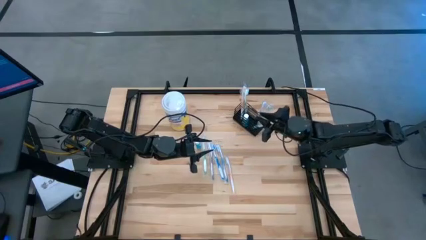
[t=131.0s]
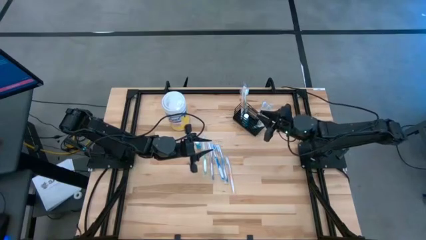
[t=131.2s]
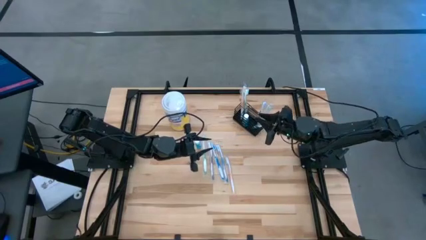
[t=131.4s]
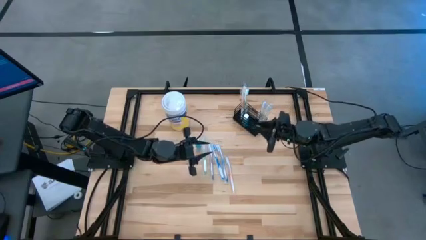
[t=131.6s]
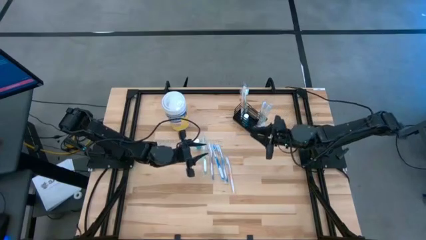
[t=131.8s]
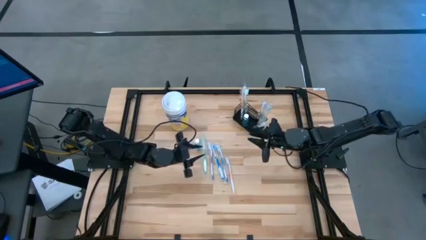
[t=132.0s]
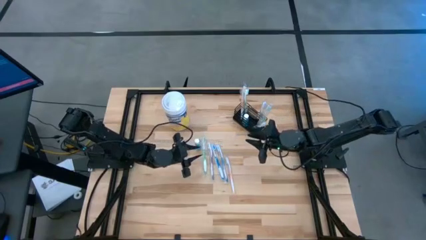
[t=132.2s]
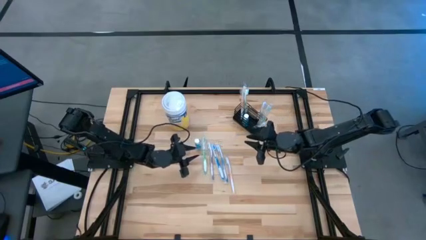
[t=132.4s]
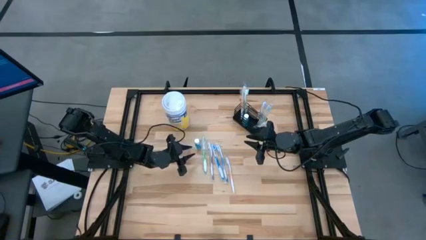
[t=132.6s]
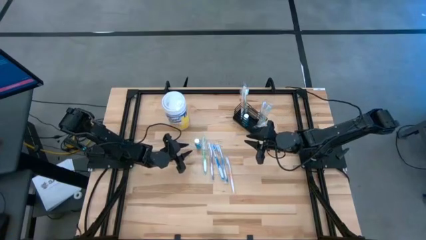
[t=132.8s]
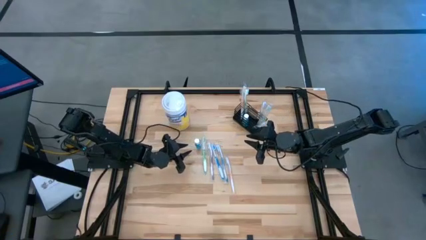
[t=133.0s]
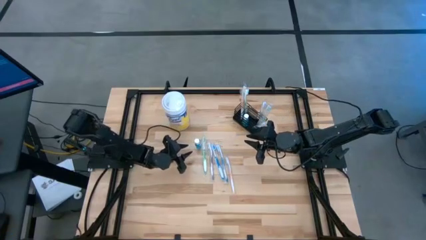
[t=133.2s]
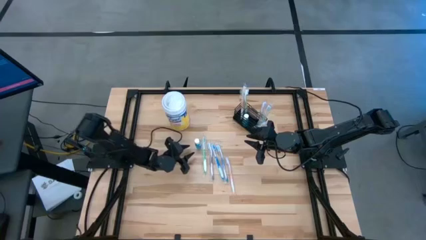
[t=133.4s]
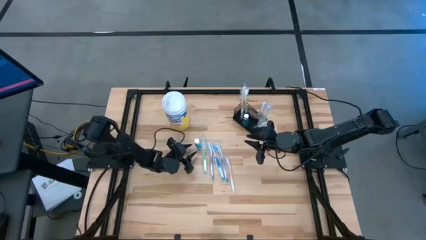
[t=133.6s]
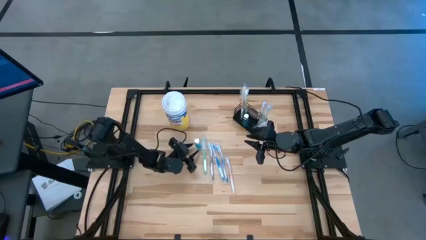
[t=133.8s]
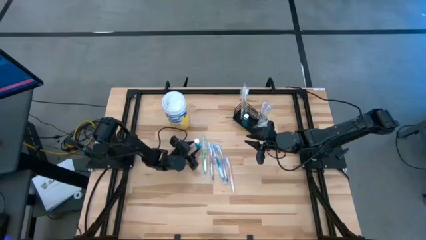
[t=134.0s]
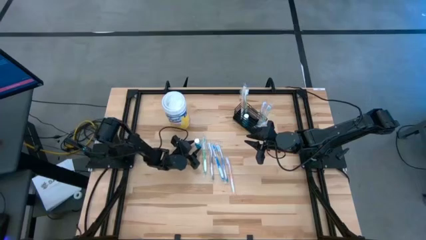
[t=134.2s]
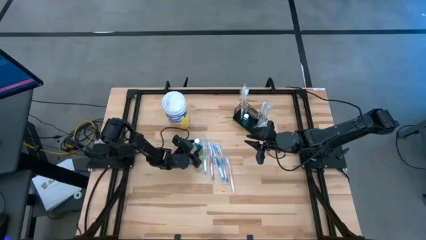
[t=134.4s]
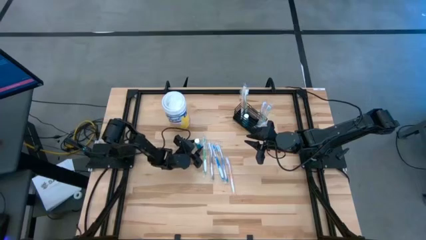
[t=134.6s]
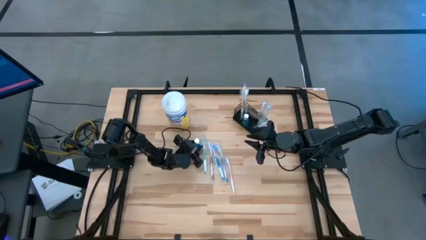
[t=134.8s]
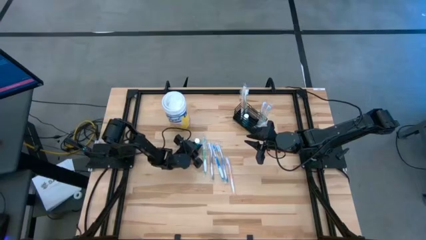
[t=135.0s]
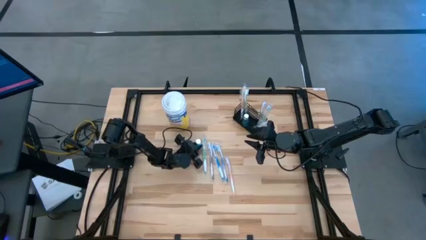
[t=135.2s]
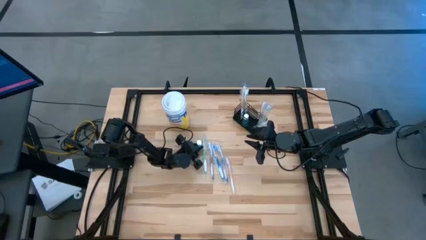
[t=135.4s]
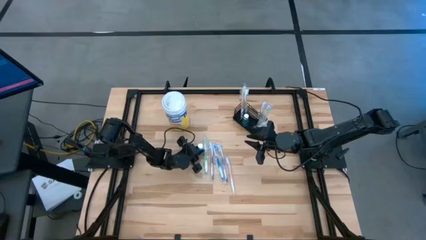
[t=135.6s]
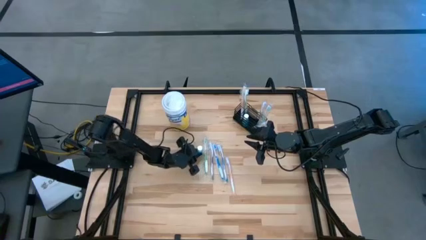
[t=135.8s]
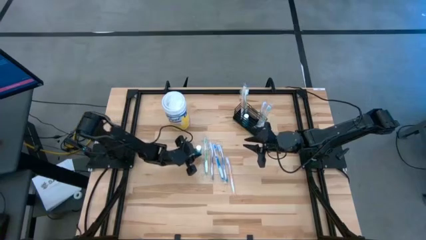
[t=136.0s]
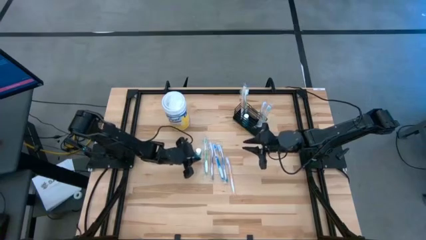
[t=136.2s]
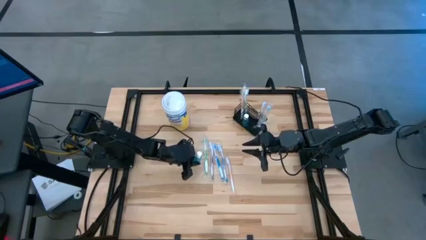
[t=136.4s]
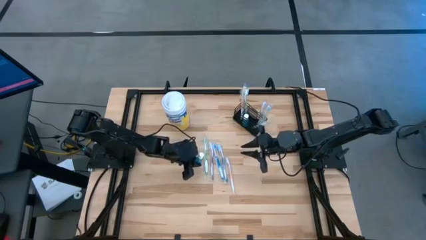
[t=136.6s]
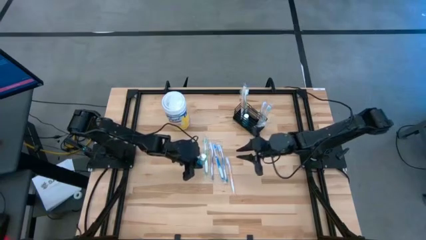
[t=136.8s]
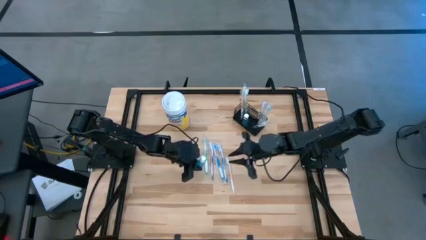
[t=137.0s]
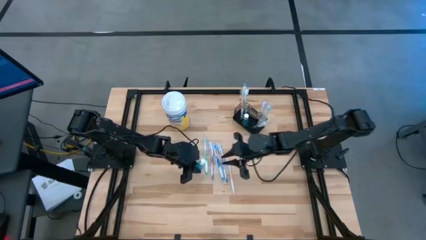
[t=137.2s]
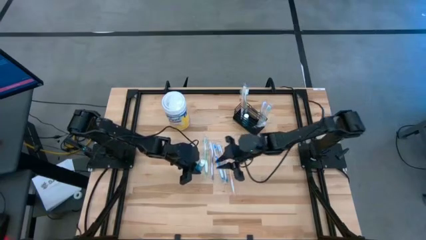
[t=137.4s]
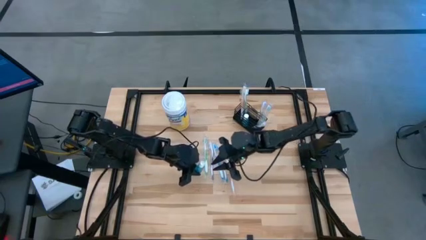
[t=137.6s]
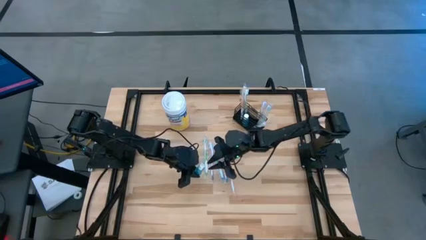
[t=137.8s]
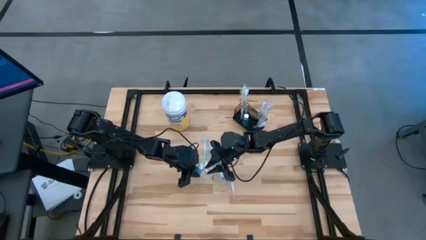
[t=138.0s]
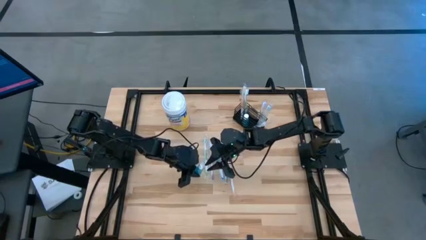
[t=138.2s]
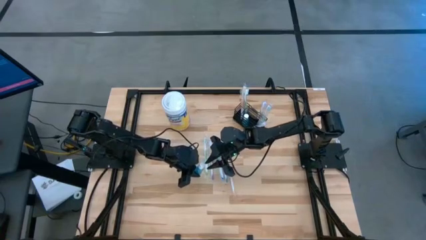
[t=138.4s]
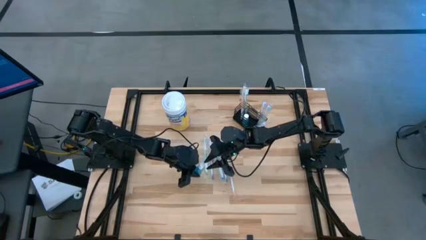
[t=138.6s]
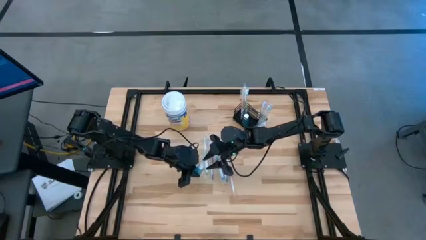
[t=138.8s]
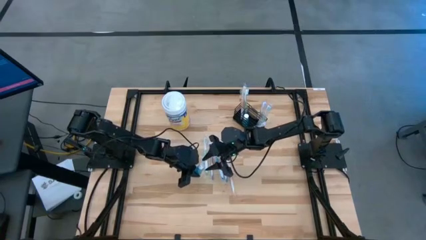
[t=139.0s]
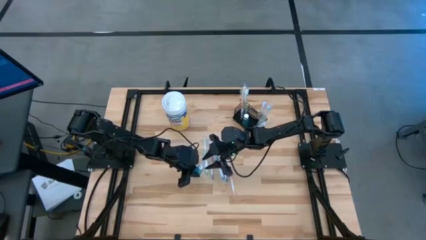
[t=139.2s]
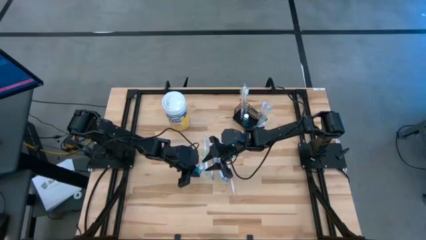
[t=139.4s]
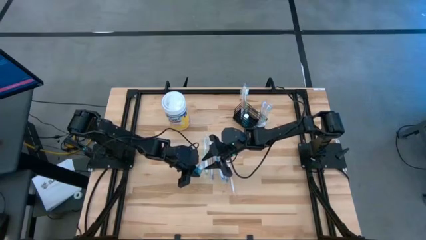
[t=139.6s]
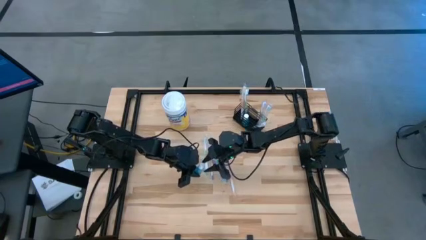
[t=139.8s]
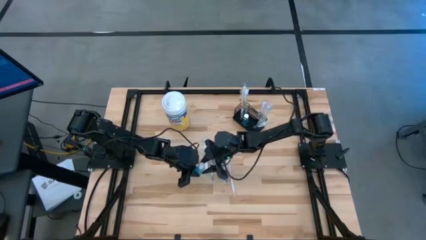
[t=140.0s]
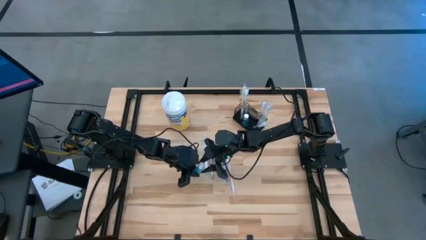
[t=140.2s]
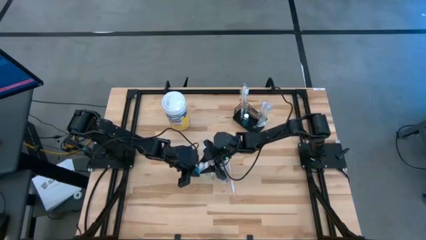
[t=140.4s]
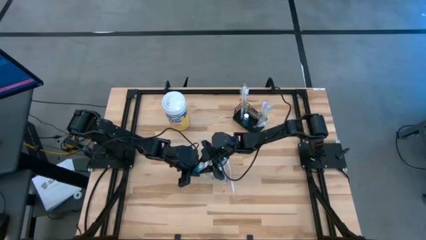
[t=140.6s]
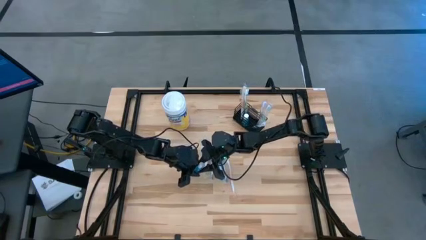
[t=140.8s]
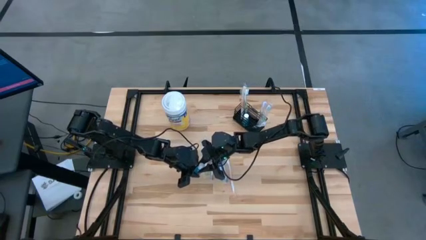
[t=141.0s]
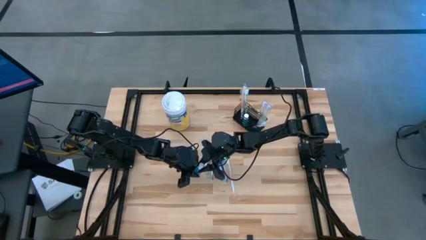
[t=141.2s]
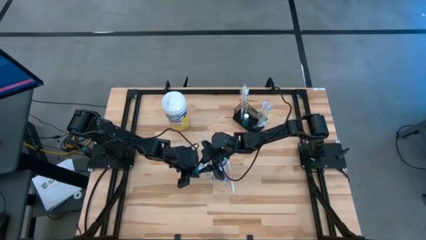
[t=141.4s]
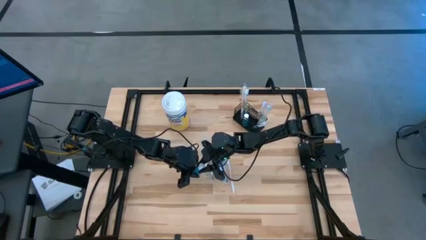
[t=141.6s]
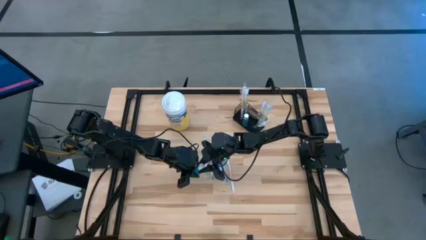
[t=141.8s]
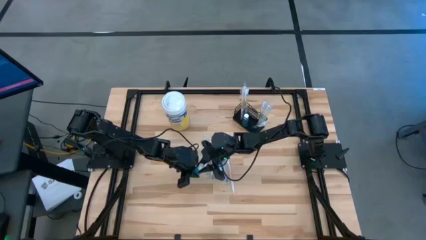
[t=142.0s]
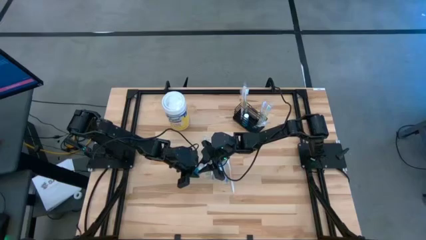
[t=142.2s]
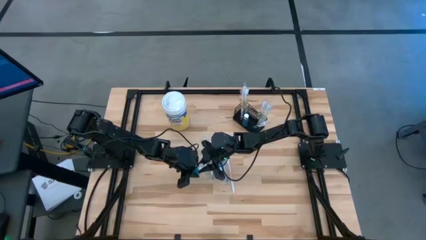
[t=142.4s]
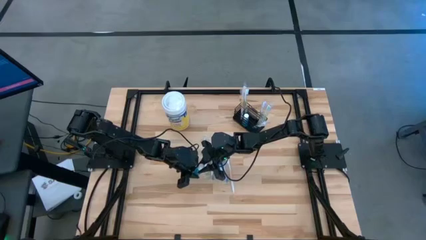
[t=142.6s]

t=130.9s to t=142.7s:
Task: Pick & Place toothbrushing station
Put the blue mouthwash into the black wire organizer

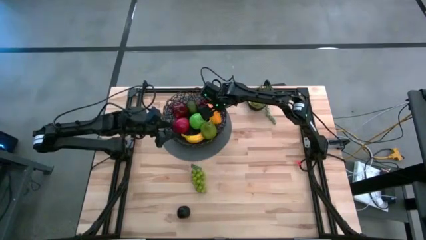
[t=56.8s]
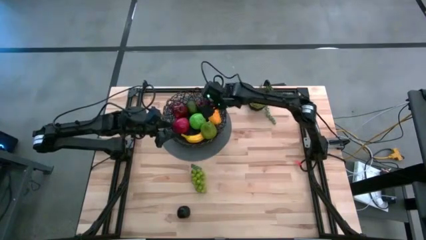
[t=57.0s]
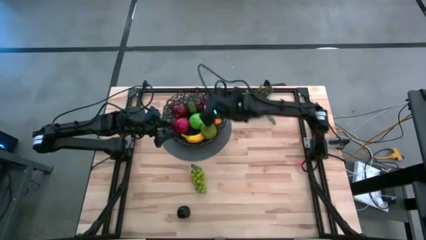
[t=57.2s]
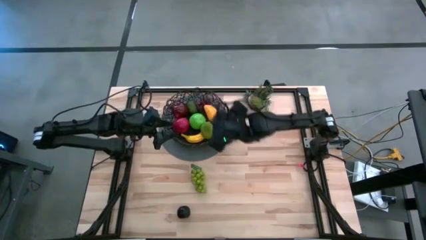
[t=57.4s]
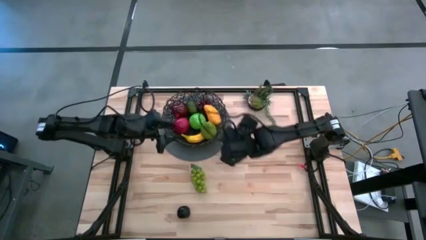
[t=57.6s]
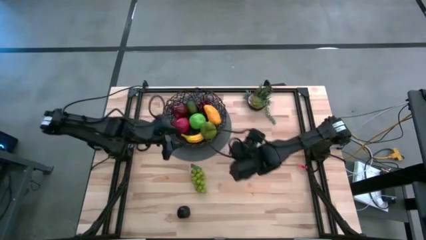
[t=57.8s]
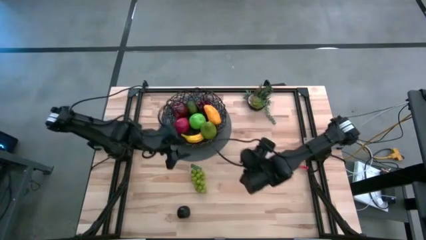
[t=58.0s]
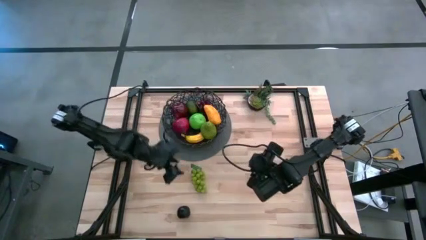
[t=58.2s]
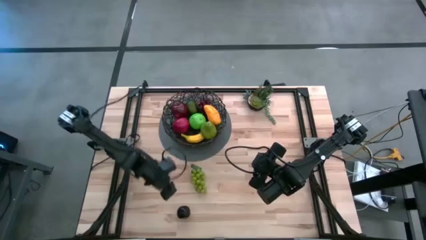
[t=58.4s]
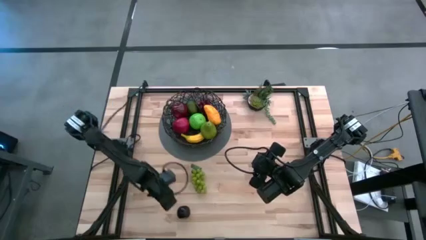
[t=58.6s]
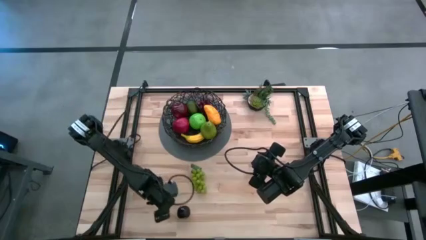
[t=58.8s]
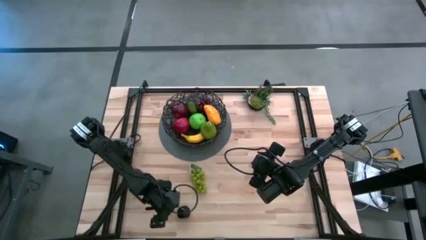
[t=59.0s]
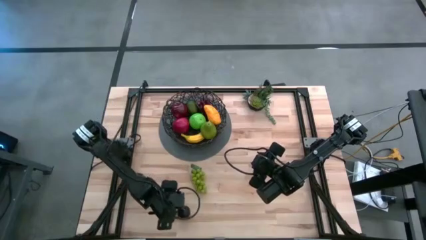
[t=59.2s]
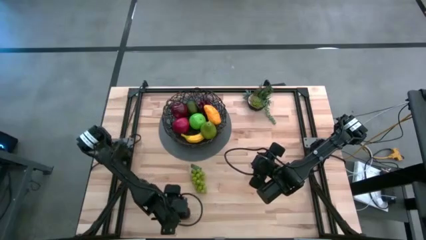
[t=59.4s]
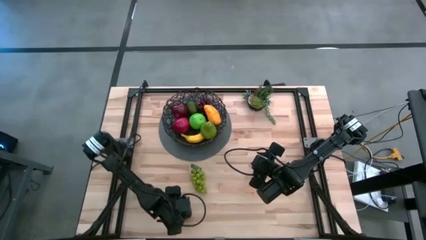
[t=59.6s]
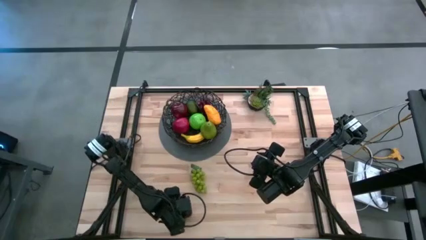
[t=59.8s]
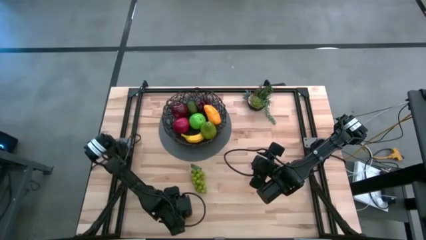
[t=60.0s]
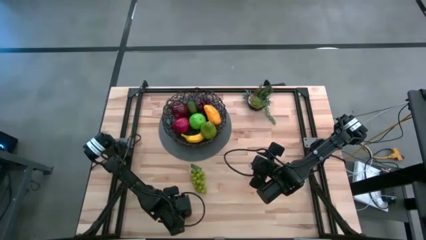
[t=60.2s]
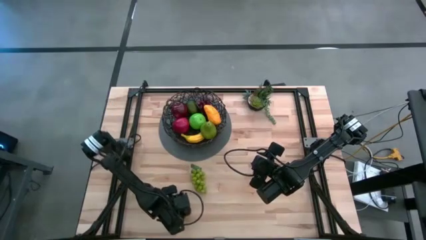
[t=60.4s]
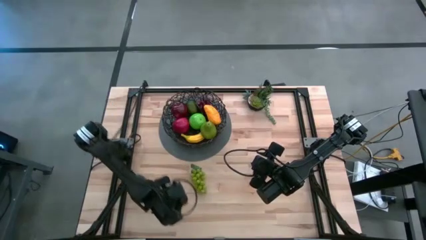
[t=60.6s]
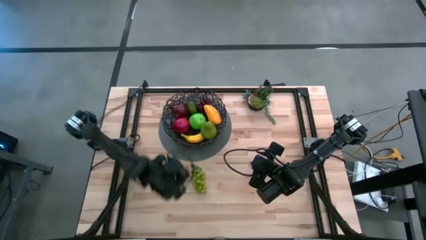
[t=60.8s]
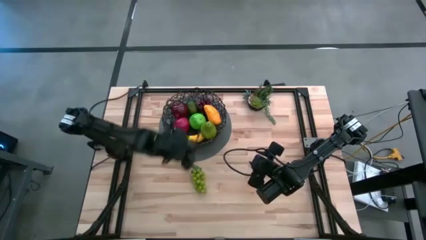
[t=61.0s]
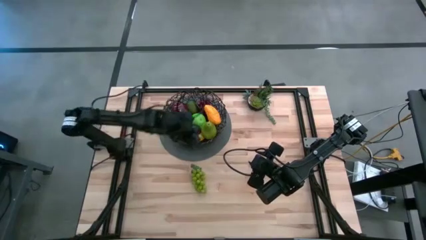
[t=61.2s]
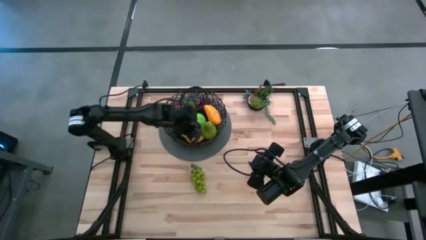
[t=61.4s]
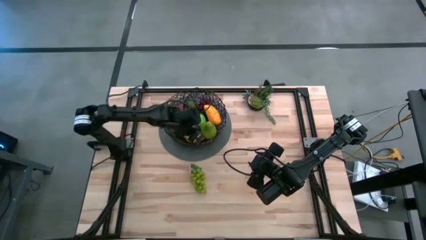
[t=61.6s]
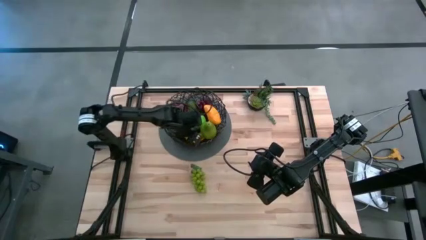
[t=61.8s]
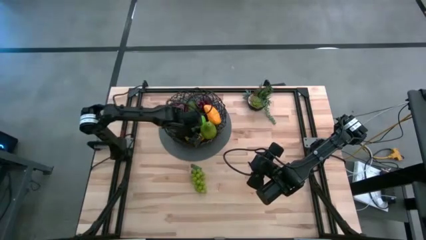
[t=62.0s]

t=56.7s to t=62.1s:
Task: Build produce basket
Put the black plum into the black wire basket
